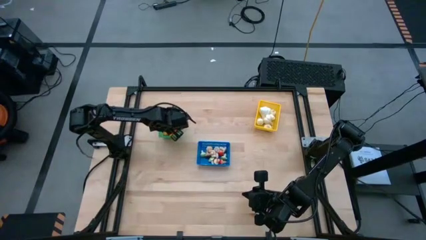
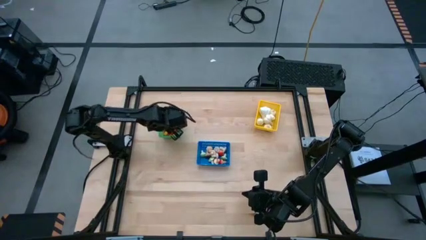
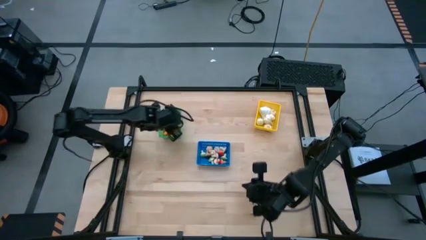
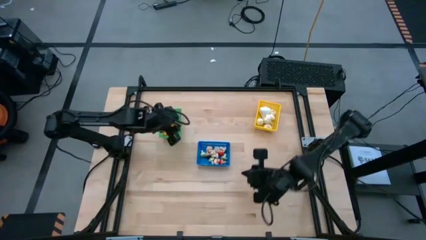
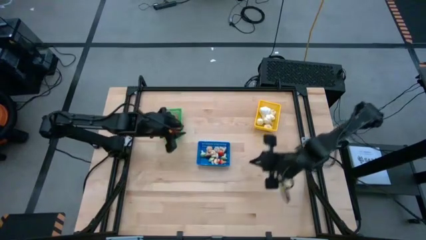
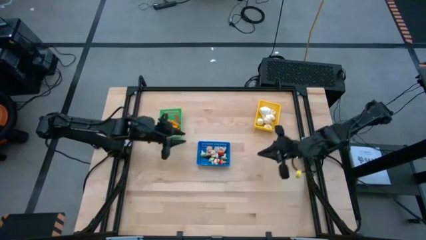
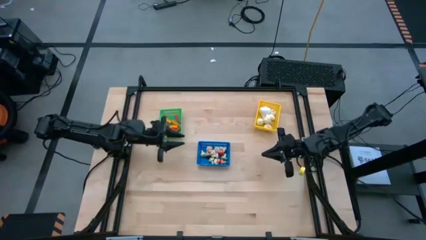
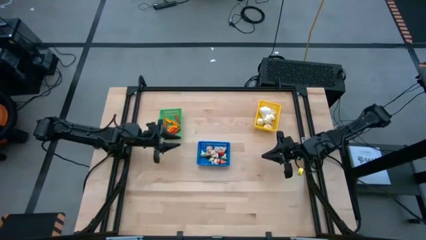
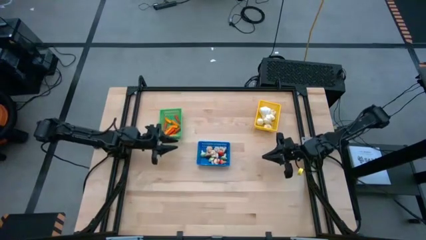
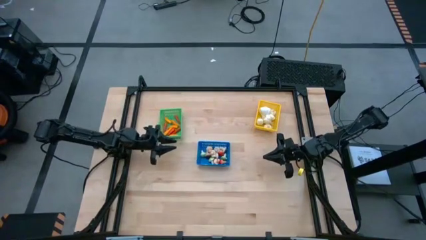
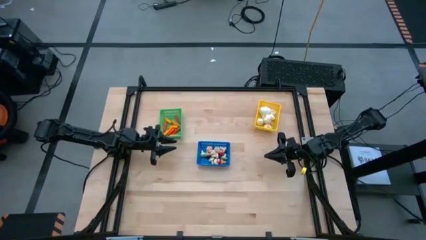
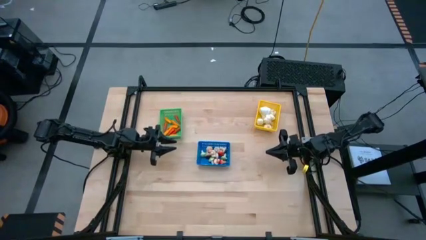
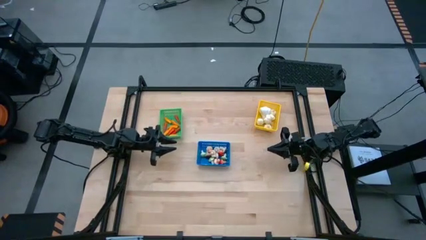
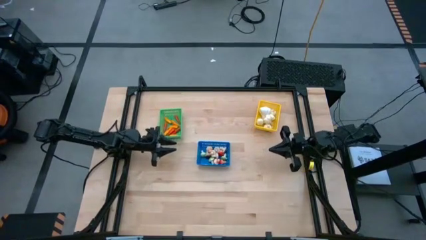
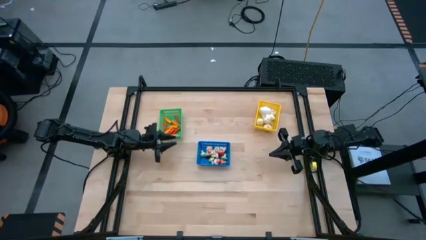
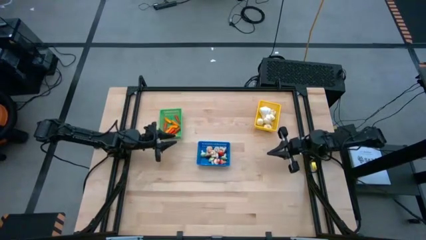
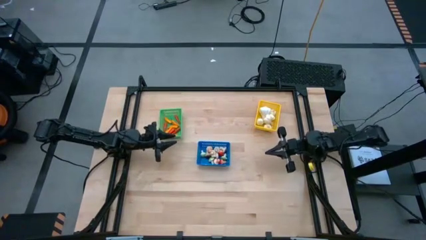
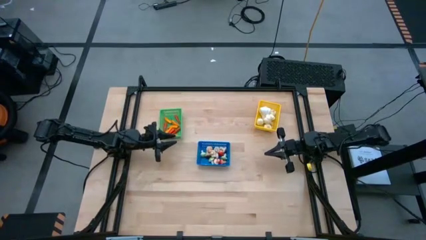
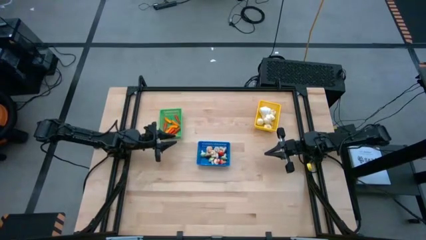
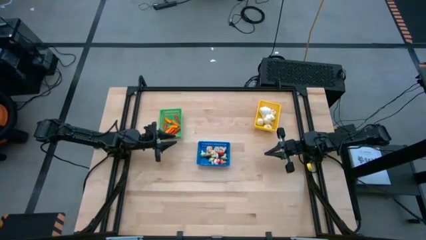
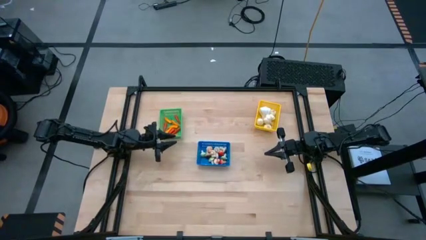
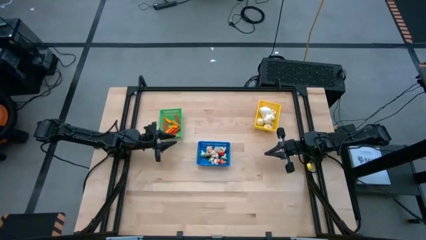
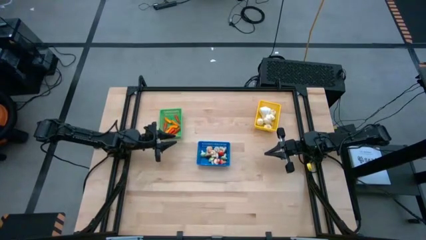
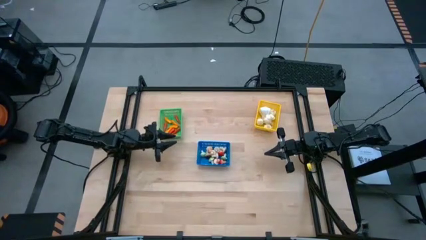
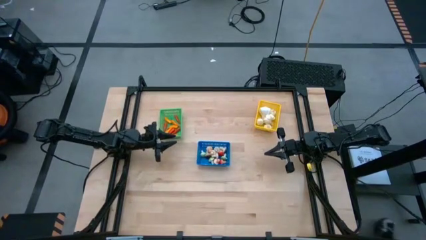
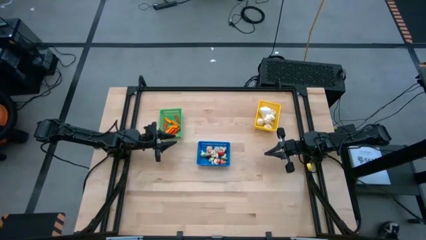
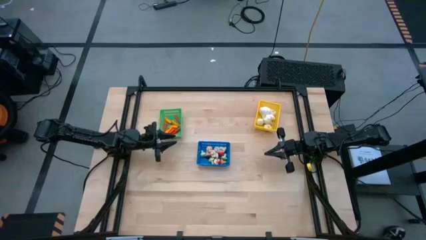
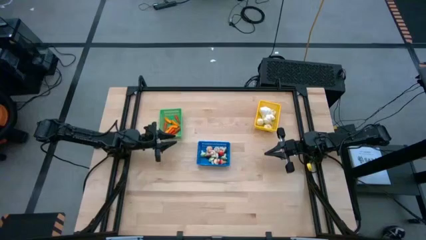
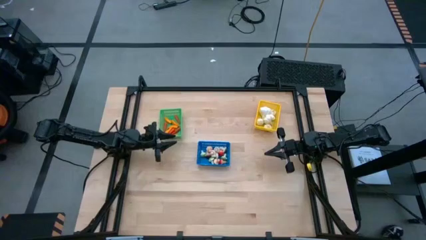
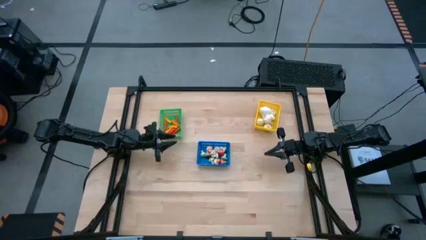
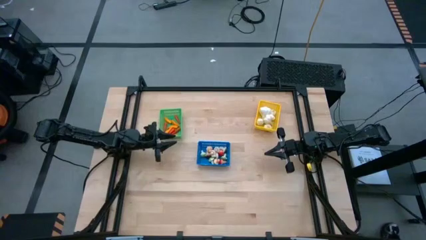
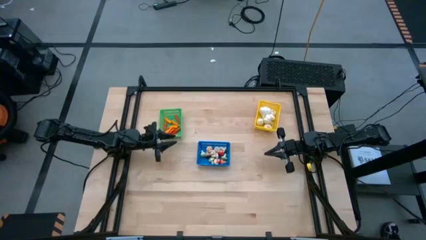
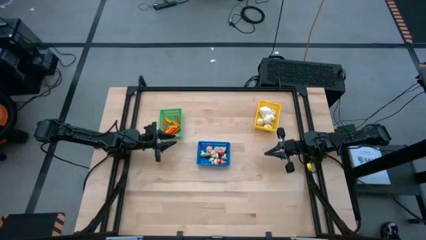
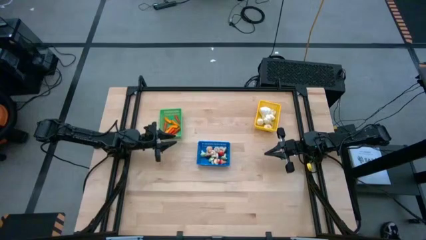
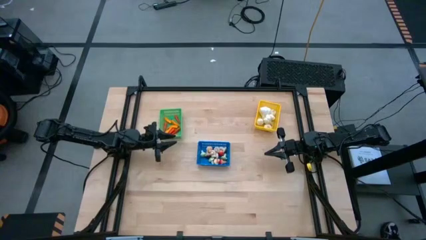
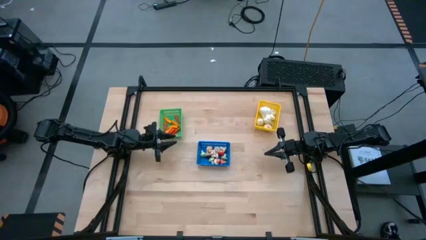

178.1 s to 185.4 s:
Task: Sort produce into baskets
Return to Home Position

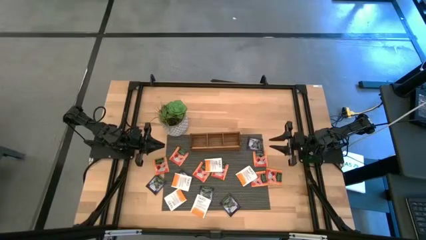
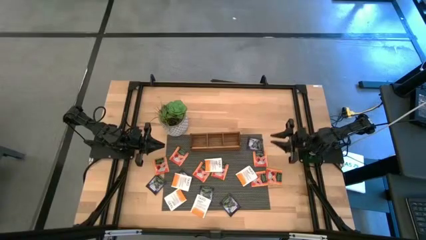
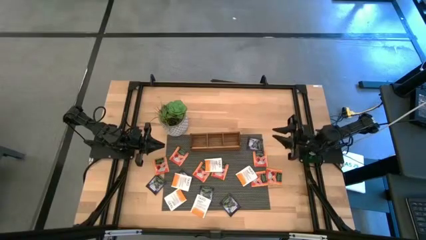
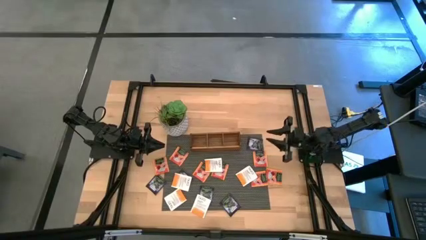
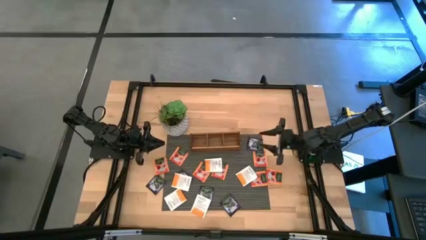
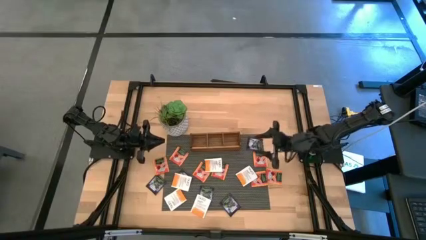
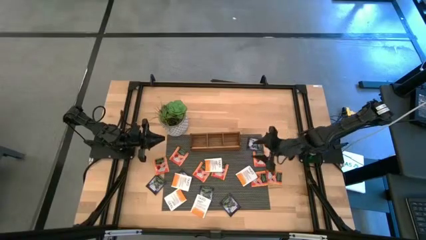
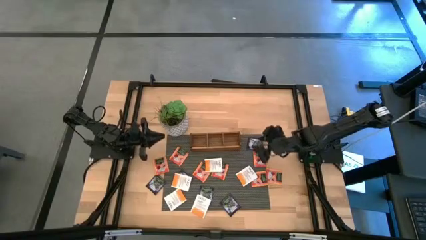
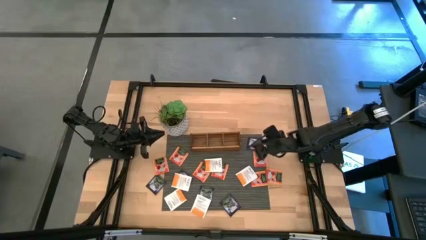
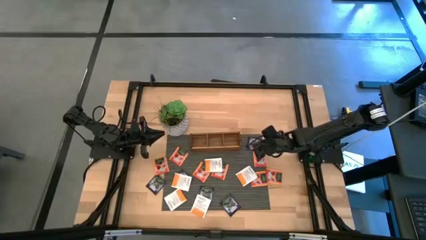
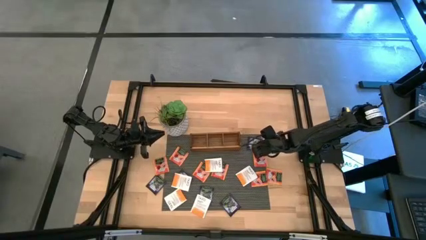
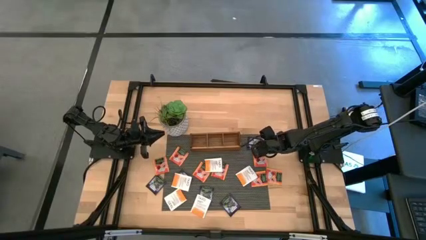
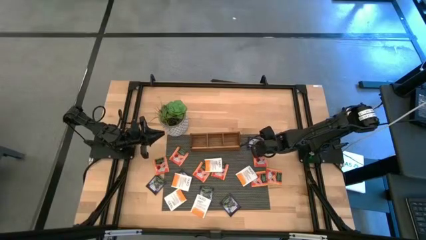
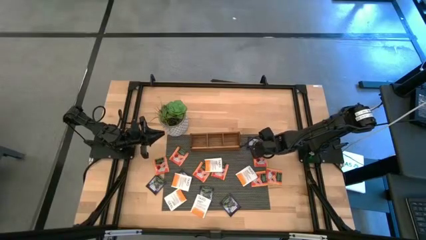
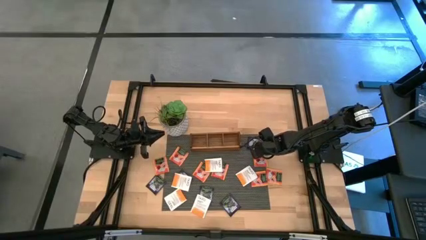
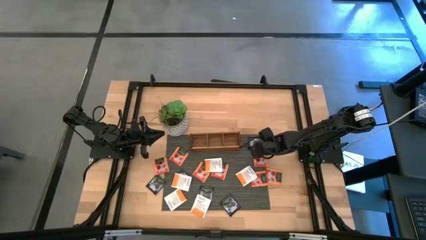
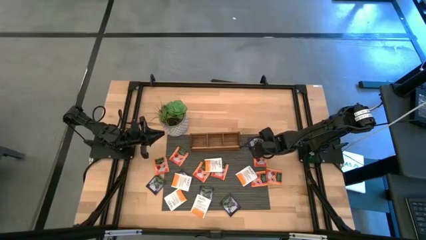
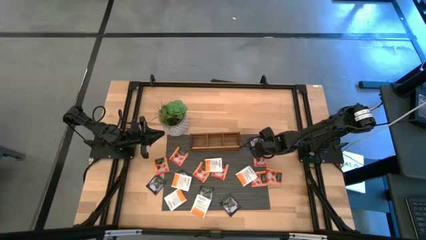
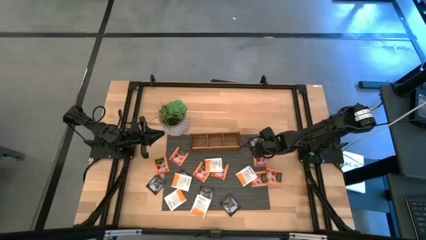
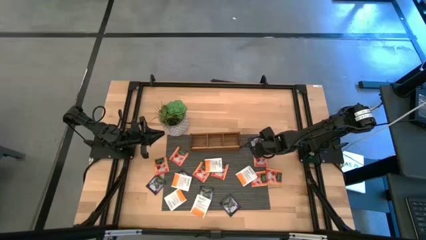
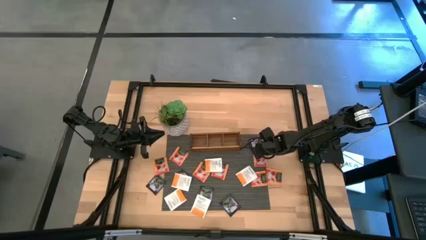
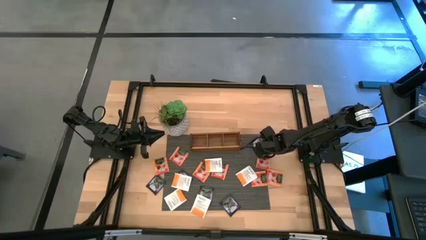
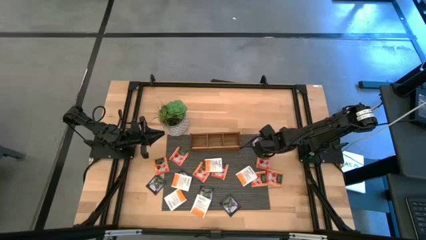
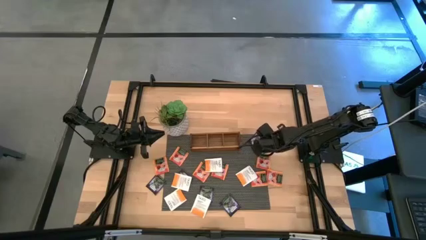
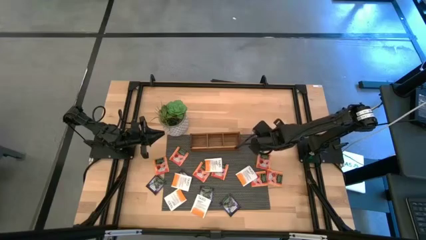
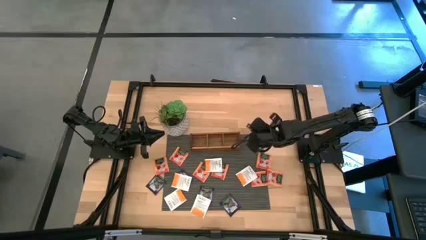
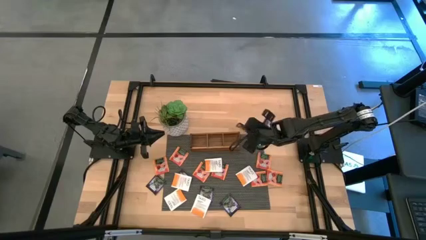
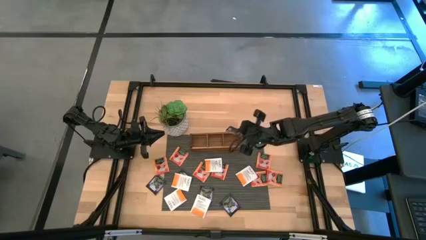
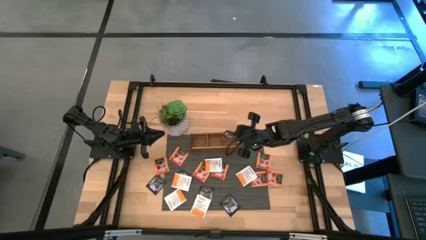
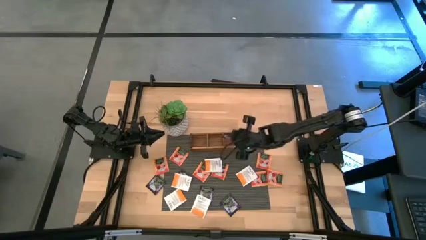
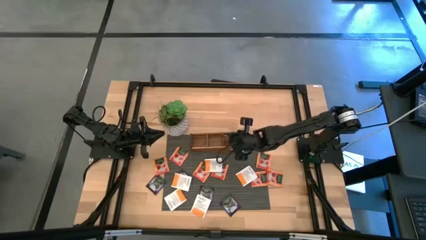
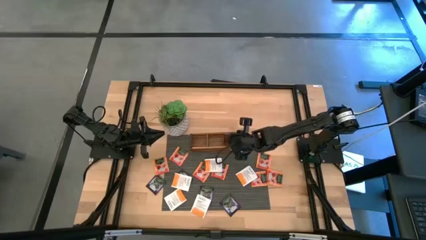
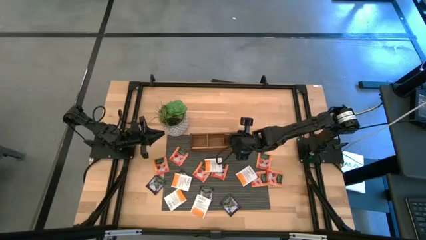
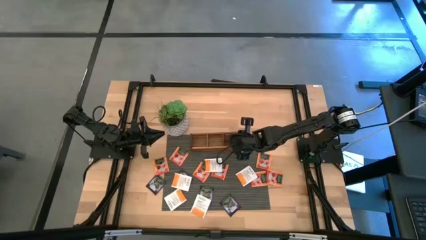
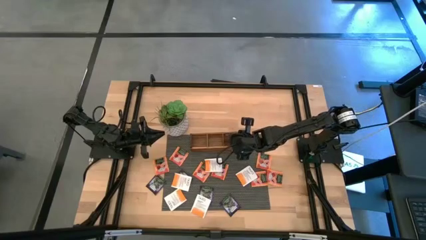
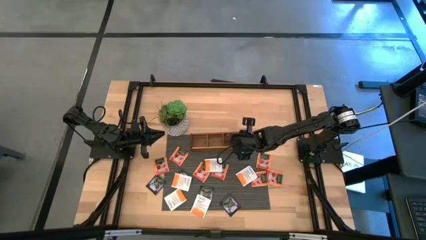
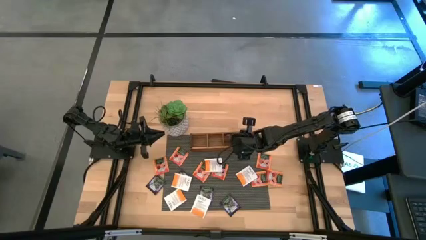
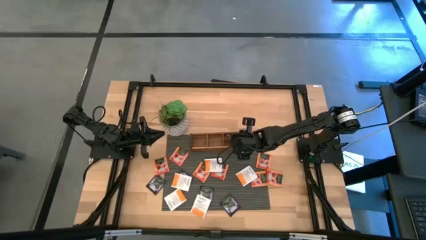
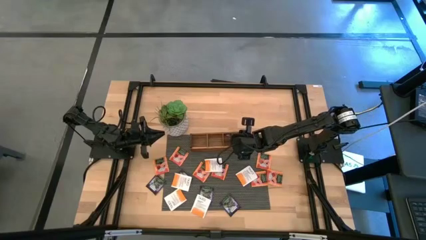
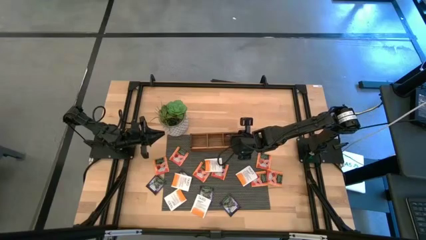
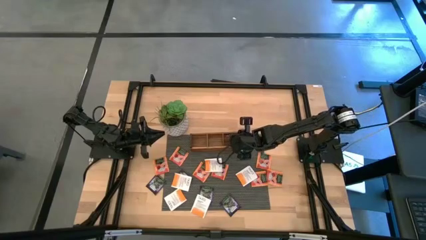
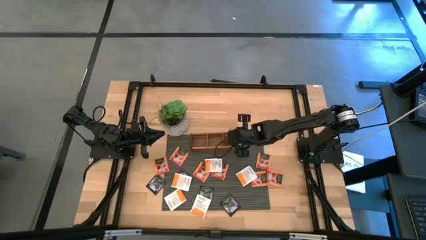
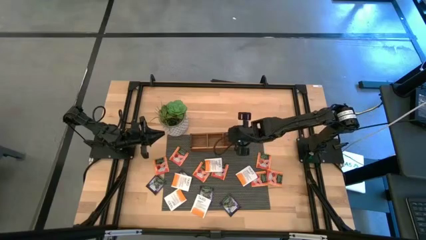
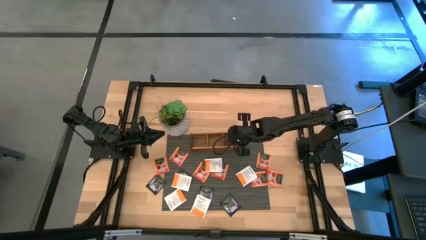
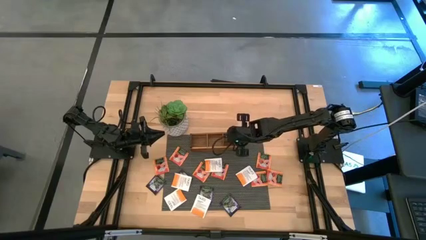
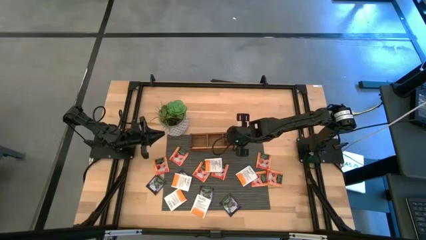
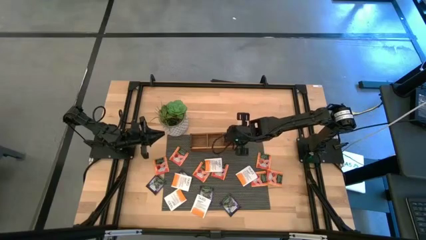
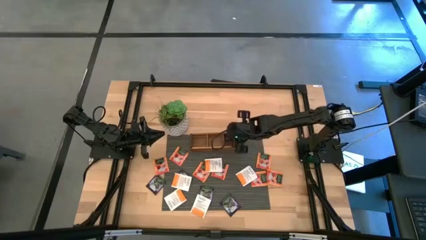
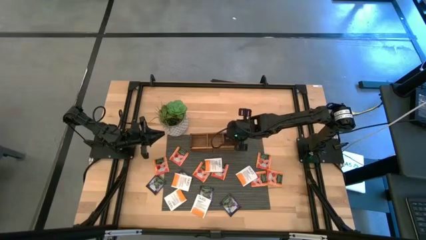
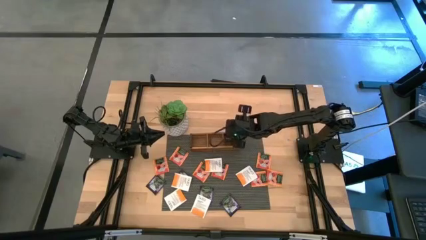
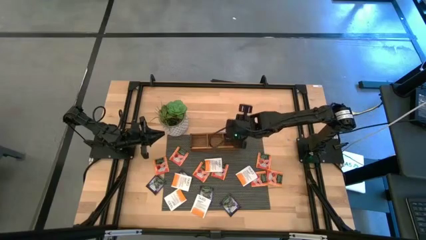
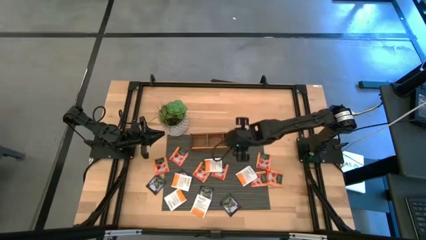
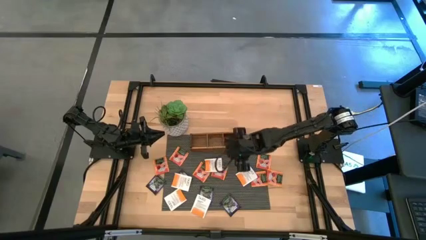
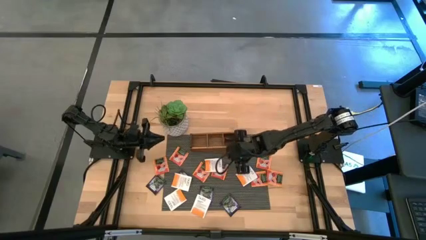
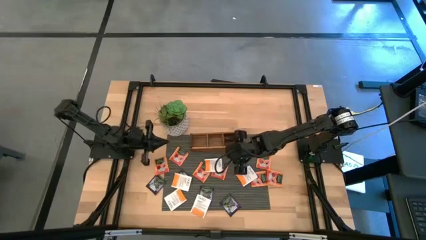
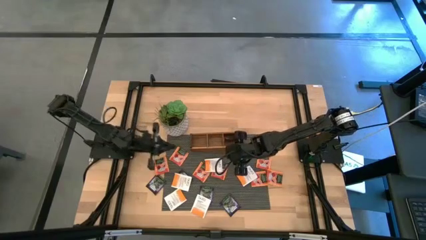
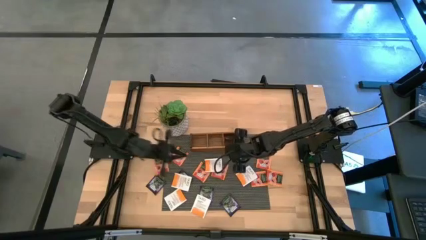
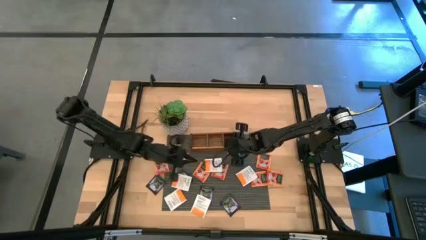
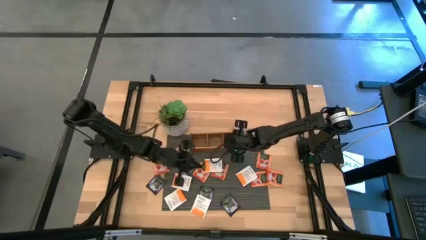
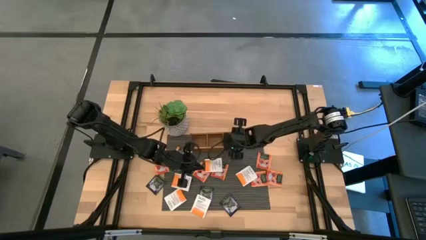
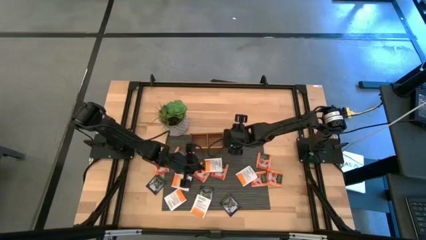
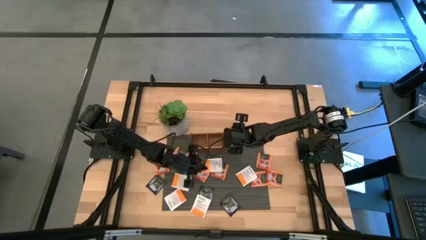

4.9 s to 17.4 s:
Task: Pick & Place Tea
Put the black tea bag into the right slot of the wooden organizer
